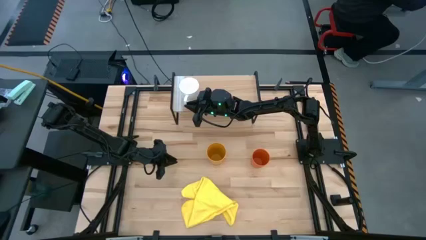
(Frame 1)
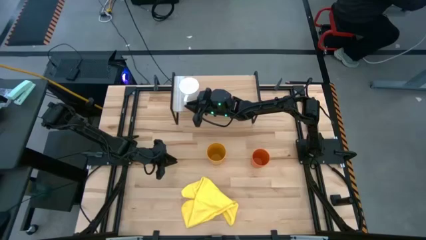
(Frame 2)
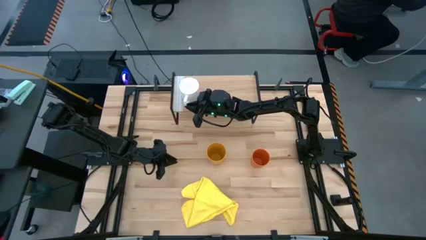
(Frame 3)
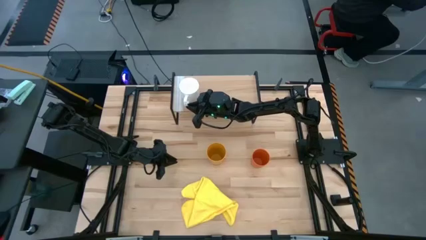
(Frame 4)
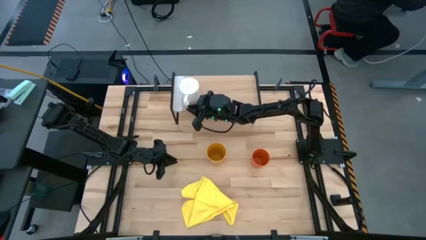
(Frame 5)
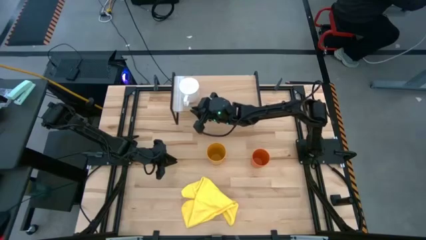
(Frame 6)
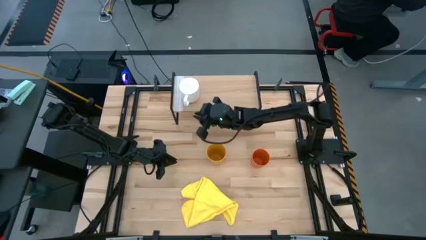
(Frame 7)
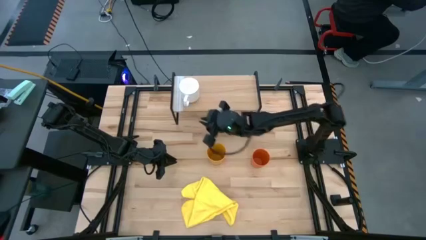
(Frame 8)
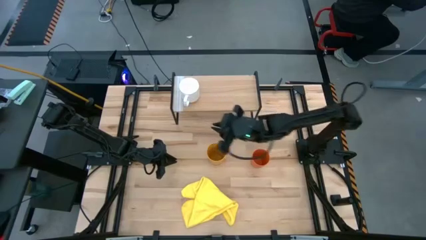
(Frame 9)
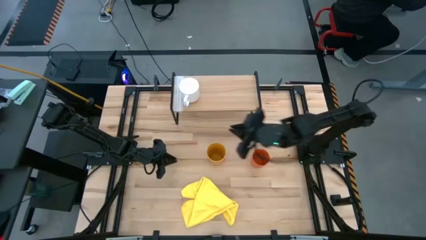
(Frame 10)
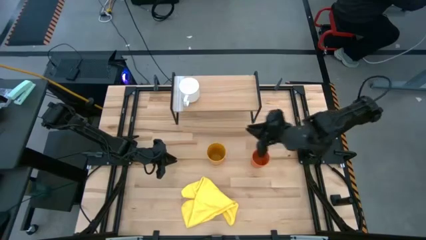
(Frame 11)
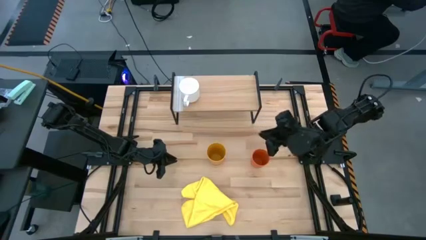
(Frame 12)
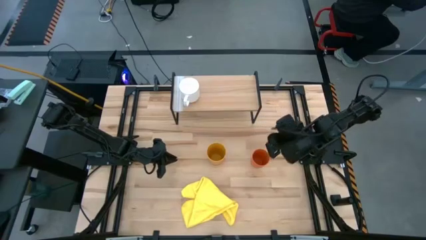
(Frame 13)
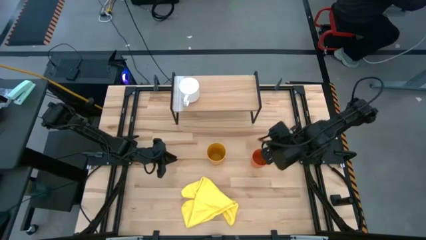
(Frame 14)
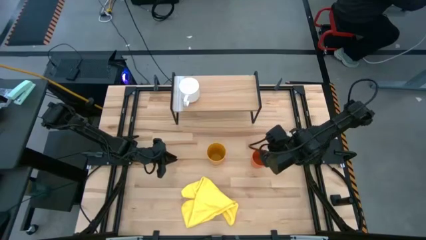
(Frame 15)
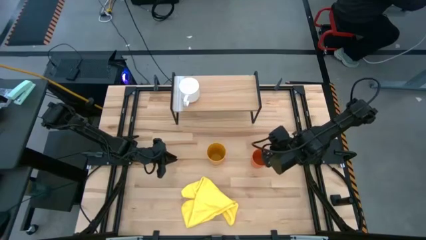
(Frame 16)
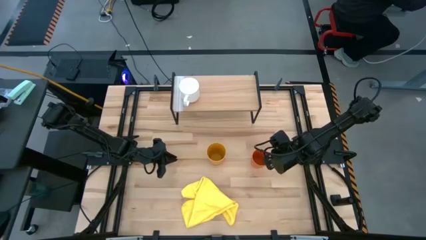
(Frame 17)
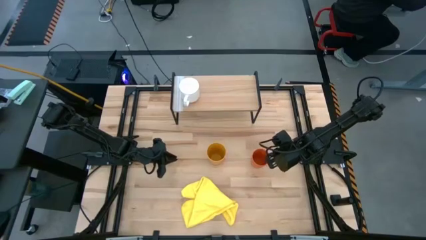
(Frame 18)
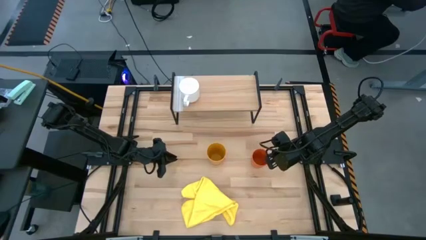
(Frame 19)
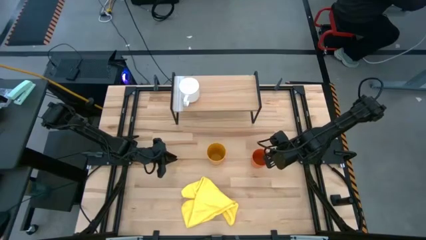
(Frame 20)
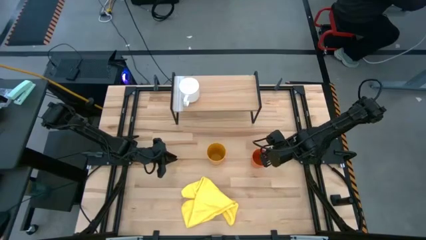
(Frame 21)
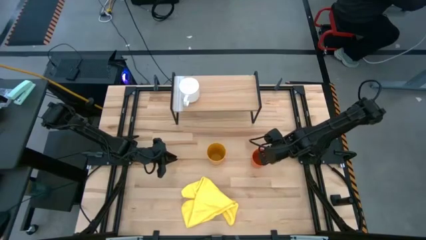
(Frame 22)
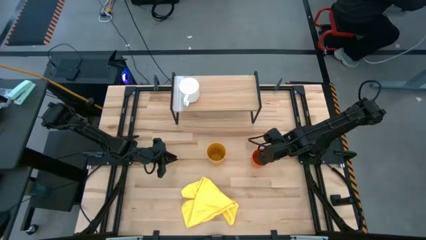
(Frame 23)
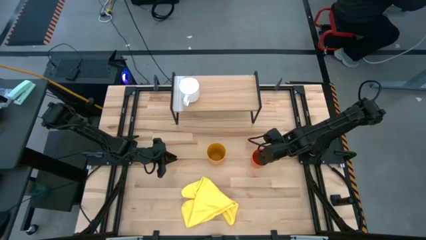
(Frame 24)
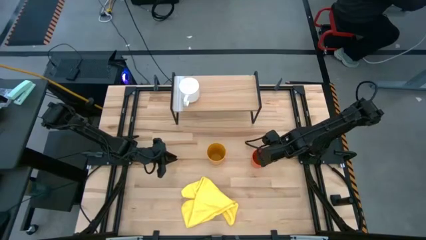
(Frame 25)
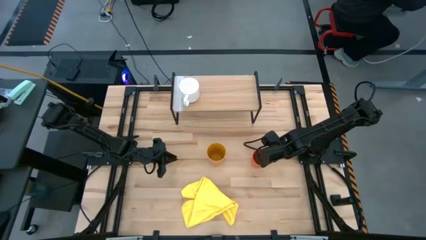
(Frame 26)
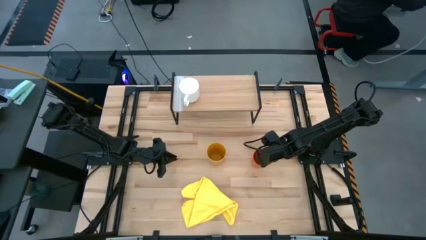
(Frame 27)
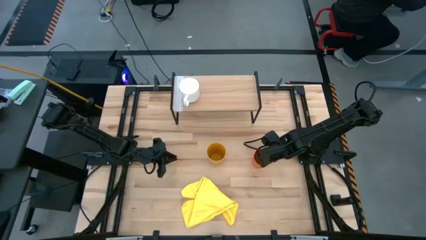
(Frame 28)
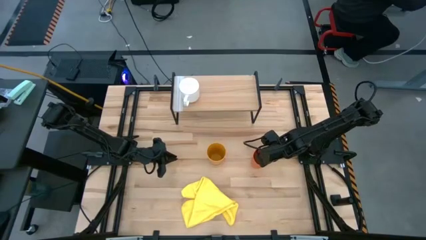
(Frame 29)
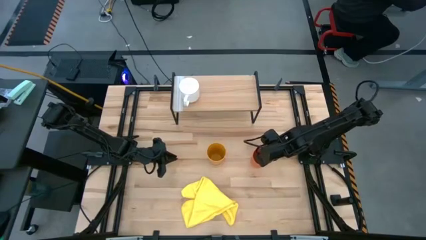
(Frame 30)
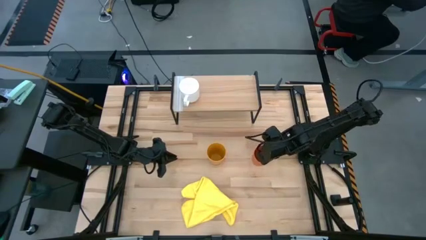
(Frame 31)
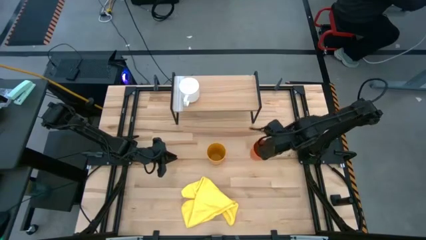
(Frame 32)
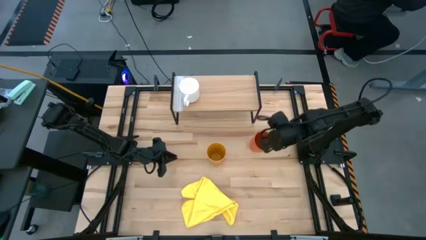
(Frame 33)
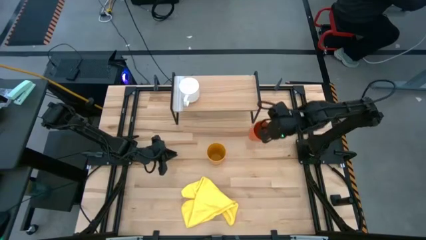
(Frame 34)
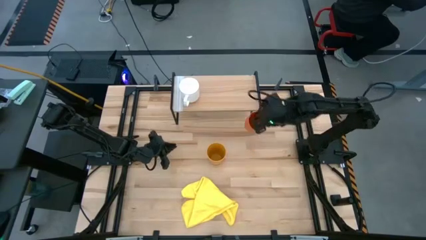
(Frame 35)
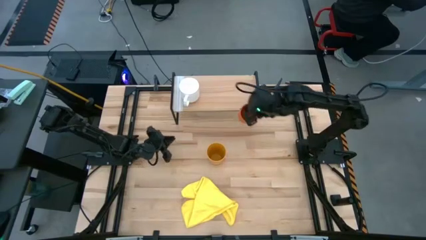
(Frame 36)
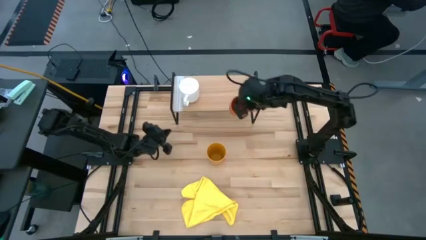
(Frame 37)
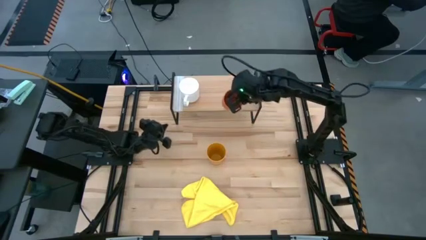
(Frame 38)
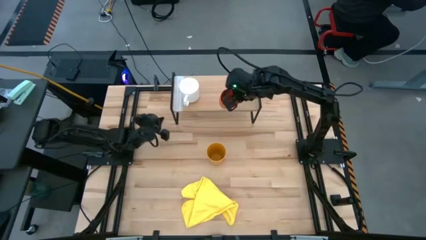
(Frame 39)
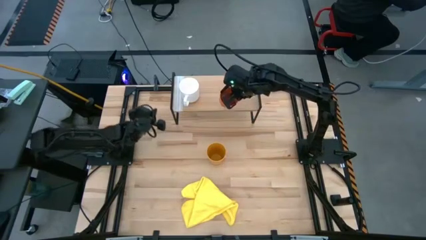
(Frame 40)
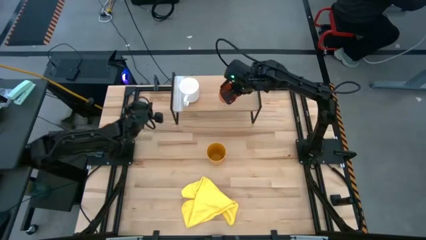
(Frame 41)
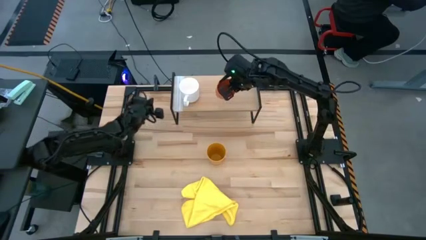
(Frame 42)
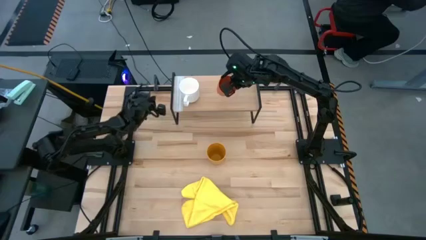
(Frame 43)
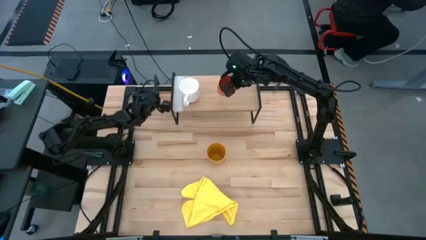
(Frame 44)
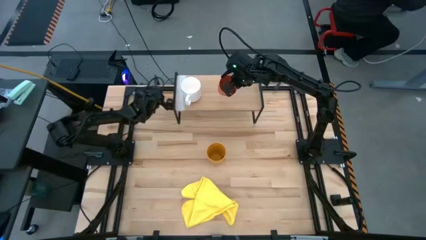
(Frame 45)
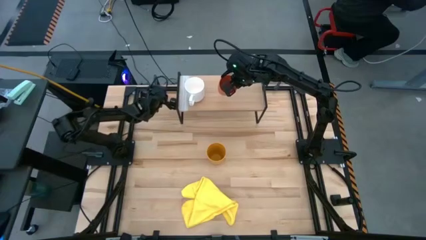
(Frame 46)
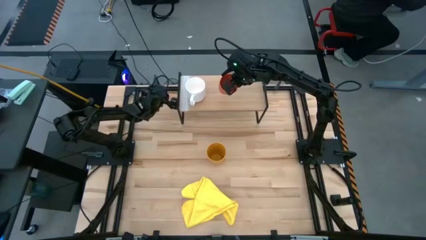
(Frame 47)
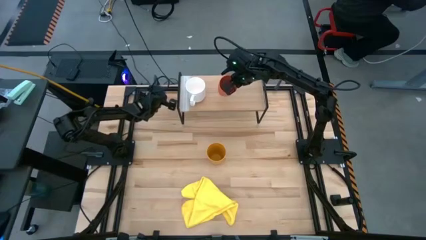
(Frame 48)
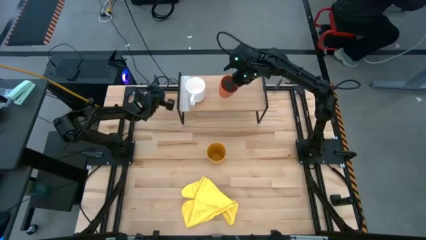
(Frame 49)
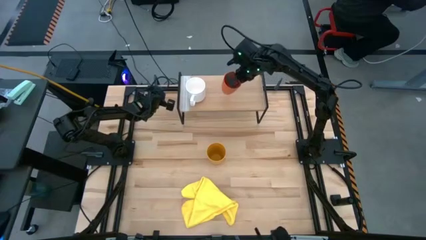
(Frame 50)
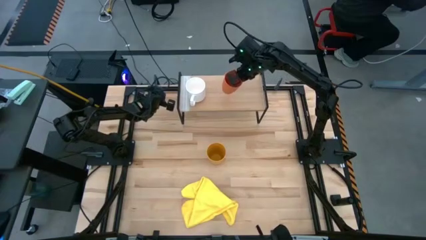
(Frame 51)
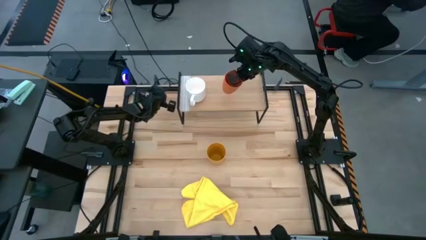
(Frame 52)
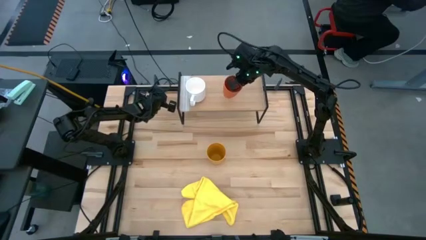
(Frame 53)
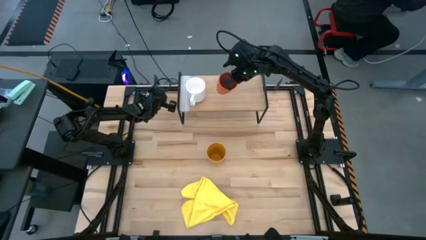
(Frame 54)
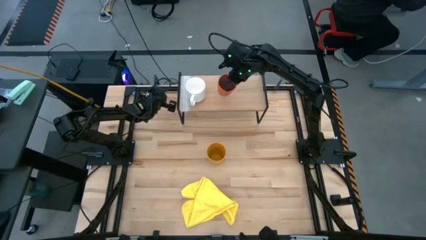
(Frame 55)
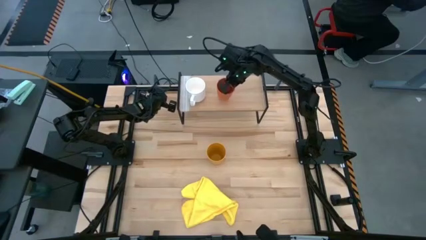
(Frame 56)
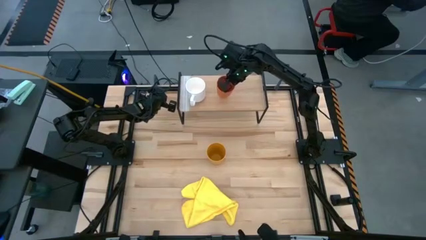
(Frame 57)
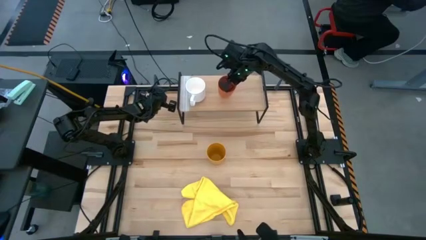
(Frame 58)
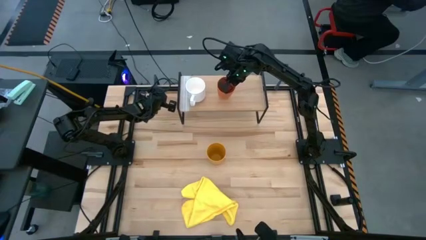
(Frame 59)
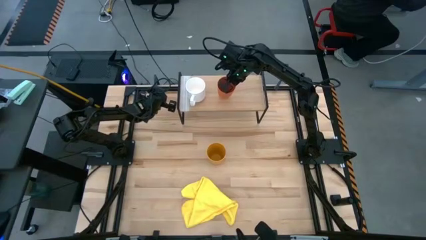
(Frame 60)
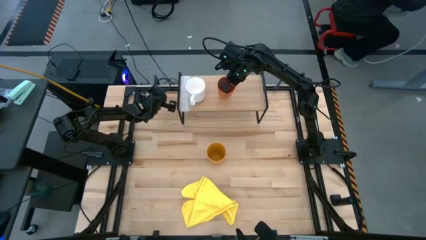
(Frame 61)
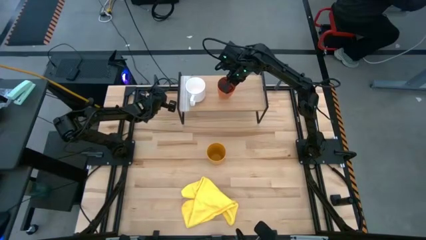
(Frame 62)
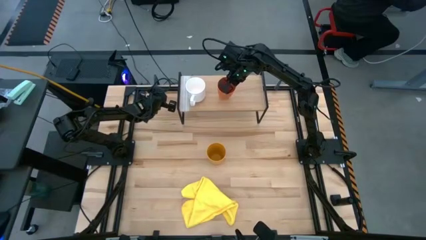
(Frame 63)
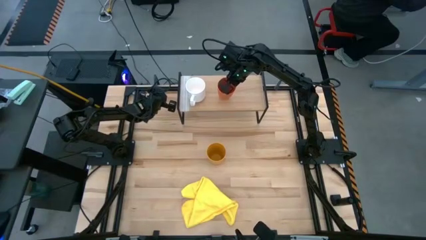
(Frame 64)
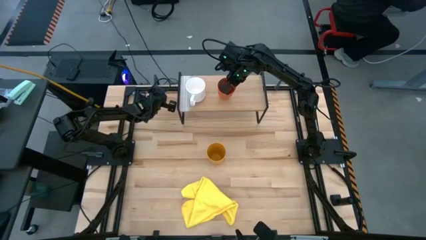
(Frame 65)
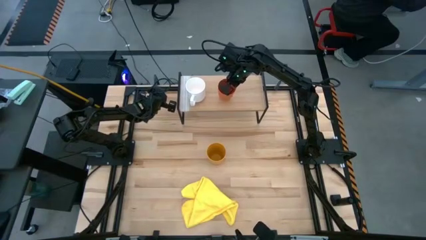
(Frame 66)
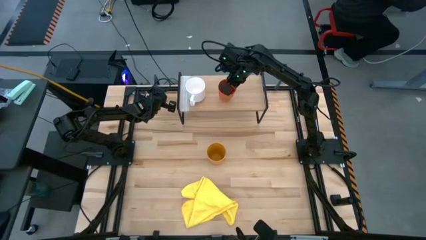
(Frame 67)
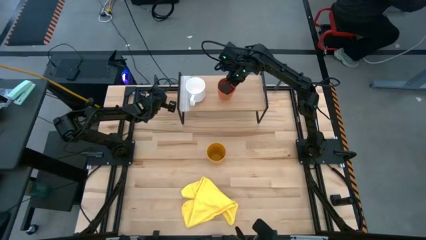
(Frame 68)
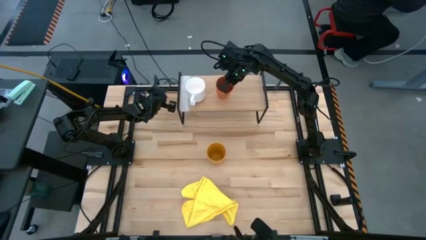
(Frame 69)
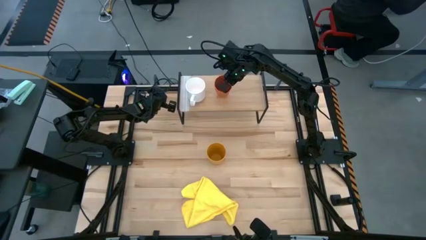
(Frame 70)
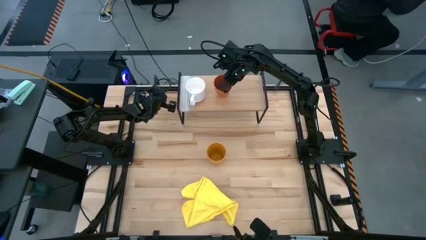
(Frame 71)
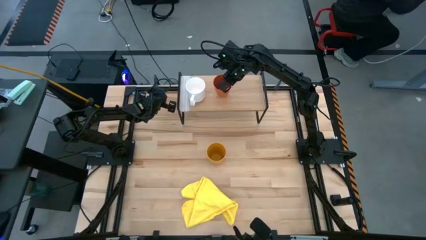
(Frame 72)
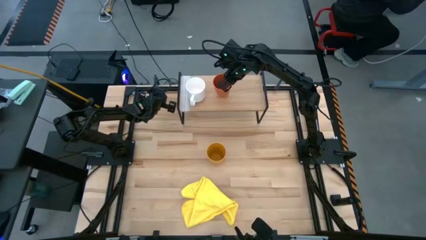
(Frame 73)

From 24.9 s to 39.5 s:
Task: Stack small to large cups/mugs on shelf
Put the orange cup on the shelf

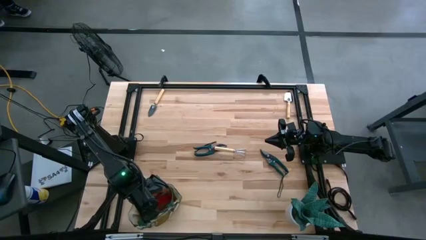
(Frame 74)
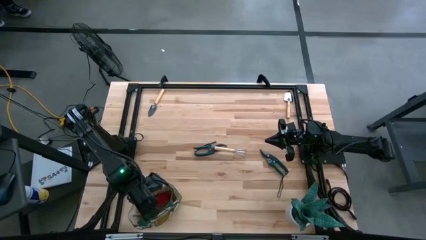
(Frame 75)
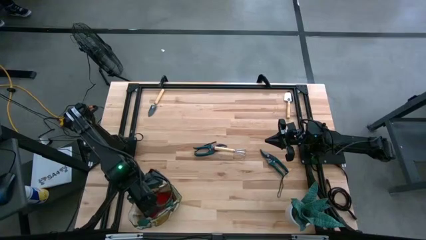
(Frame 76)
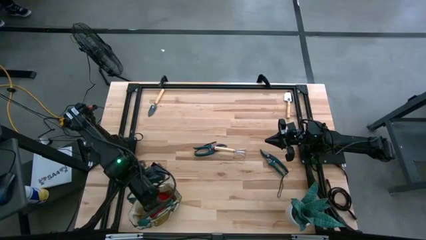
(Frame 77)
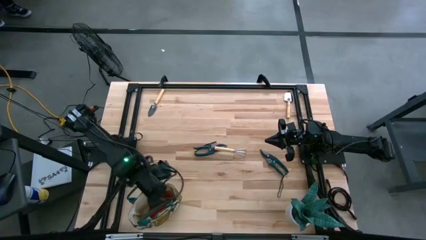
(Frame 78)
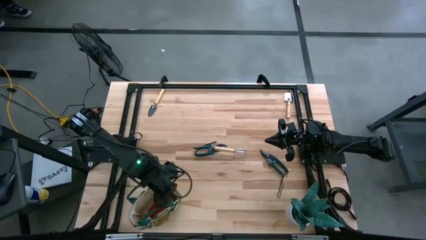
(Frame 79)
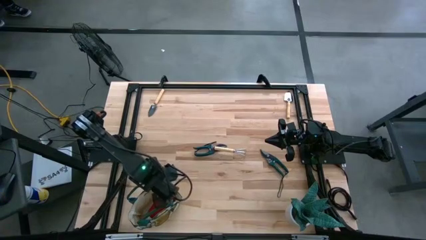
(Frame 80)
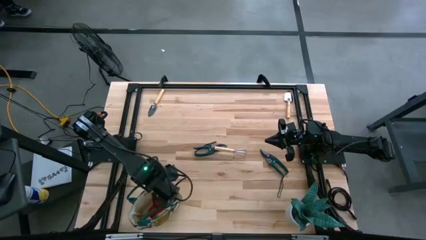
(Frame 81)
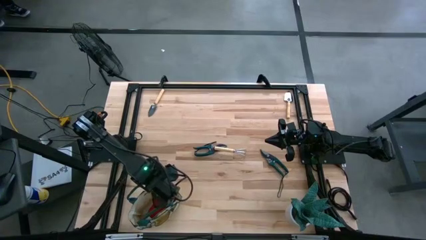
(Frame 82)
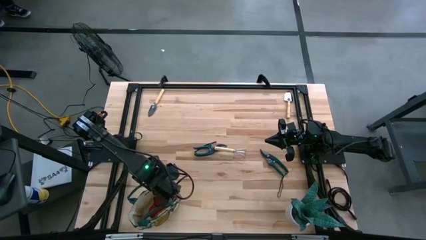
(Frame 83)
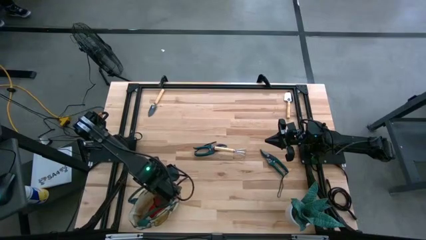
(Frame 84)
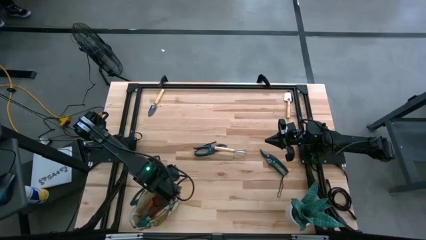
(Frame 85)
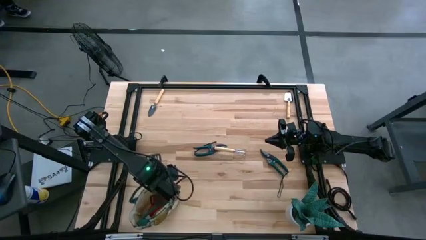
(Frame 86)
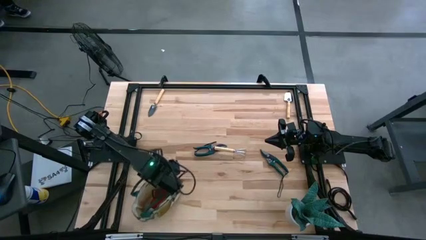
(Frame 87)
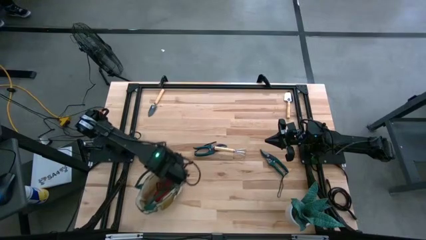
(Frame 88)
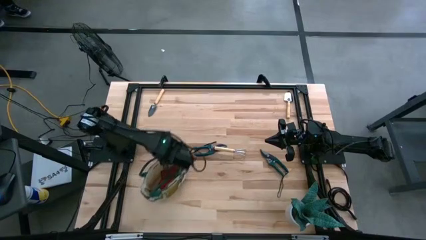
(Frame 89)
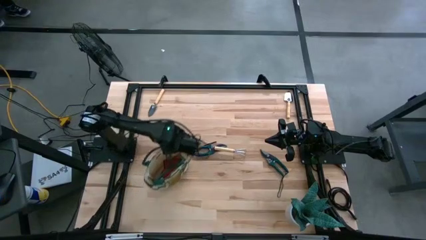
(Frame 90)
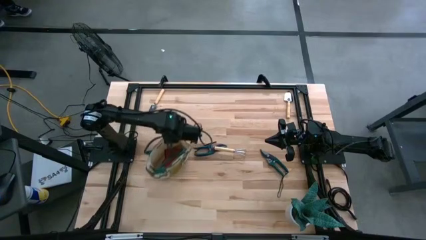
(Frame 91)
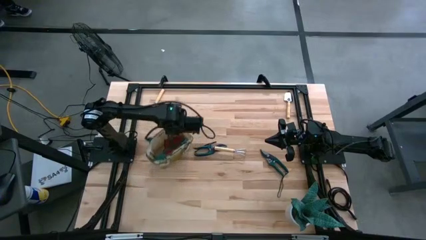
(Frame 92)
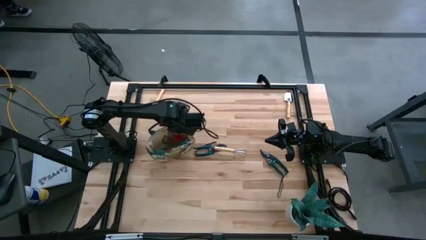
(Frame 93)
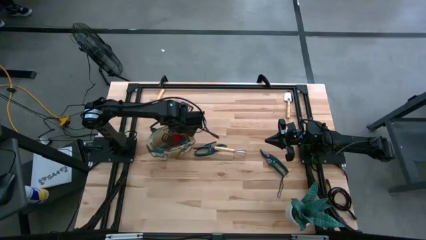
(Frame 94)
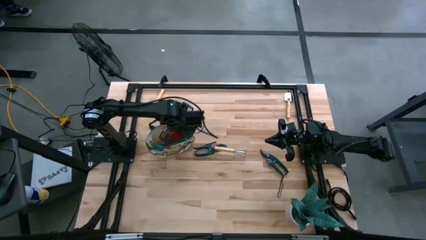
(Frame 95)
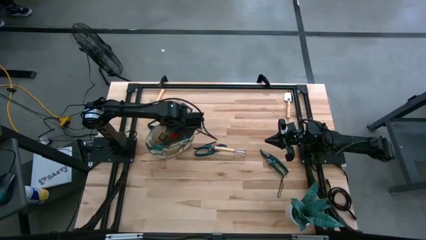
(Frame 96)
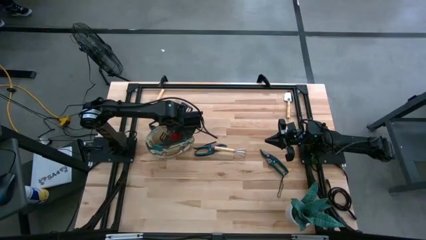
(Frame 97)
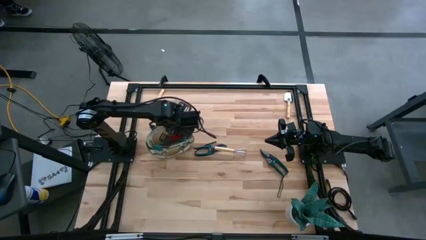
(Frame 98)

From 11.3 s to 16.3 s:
Task: Pick & Place Garden tools in Gardening bag
Move the white gardening bag to the middle left of the table
